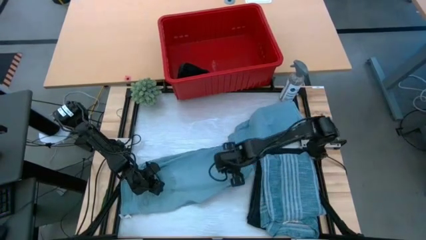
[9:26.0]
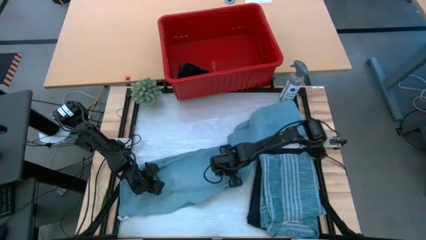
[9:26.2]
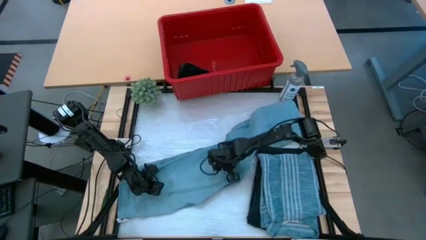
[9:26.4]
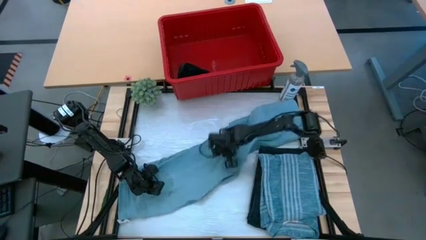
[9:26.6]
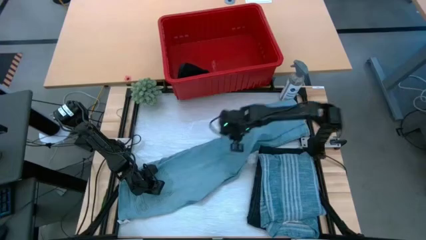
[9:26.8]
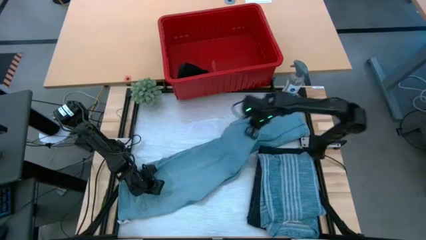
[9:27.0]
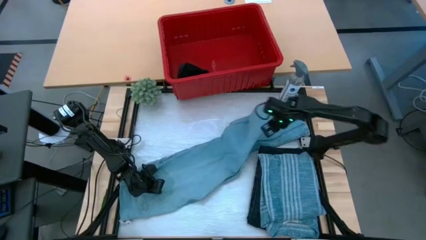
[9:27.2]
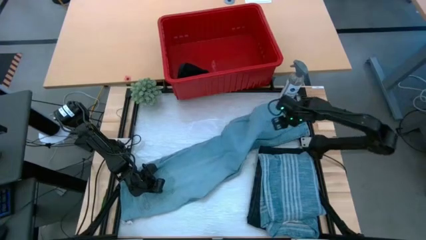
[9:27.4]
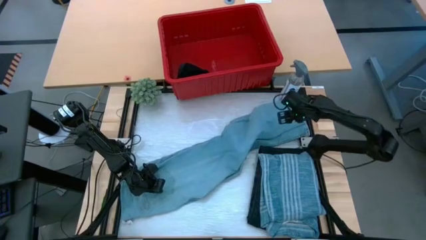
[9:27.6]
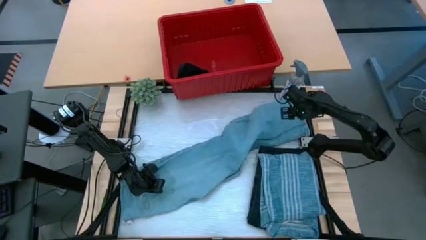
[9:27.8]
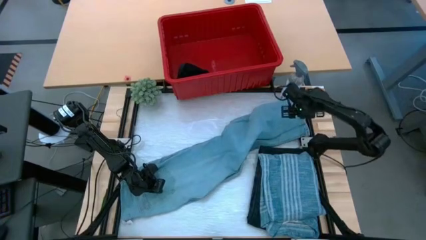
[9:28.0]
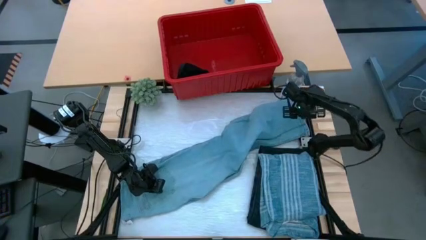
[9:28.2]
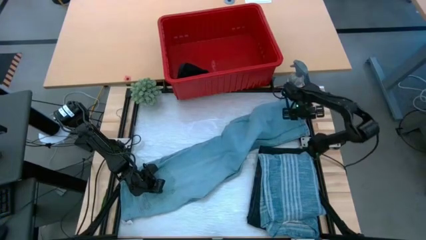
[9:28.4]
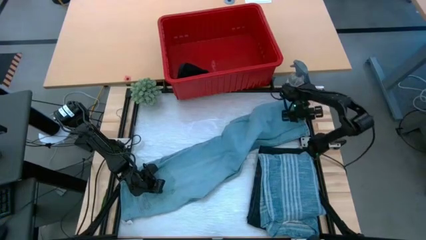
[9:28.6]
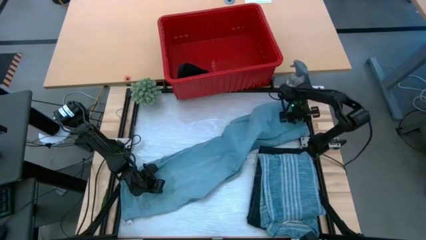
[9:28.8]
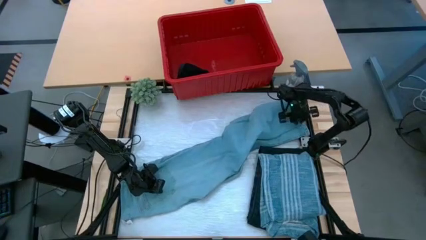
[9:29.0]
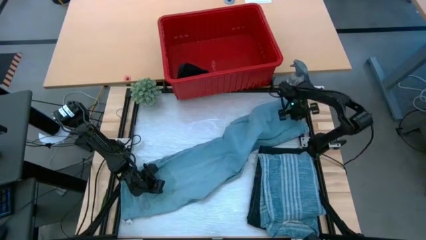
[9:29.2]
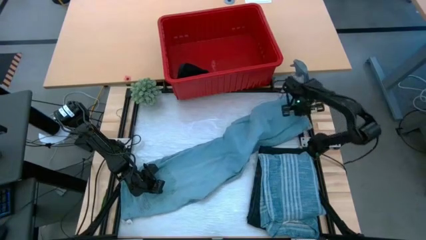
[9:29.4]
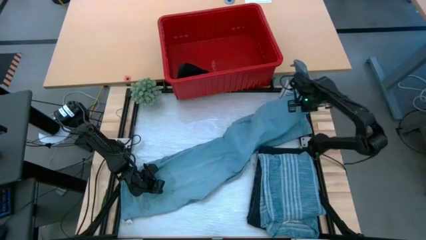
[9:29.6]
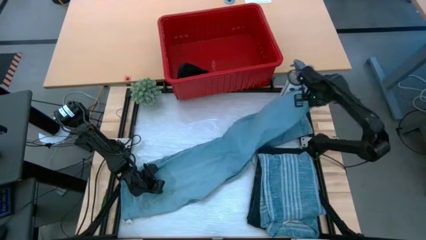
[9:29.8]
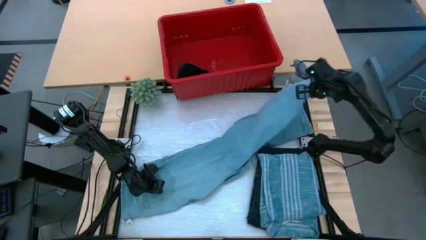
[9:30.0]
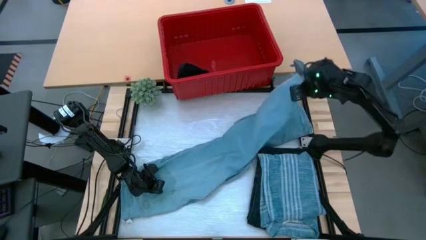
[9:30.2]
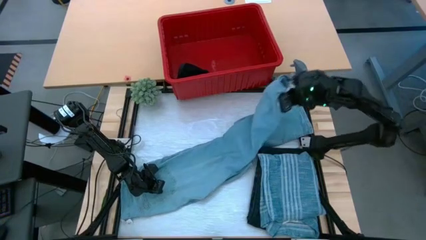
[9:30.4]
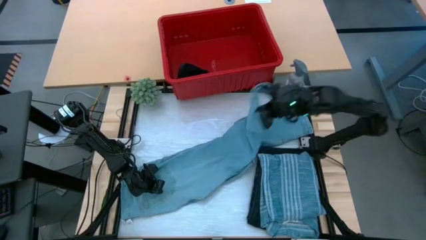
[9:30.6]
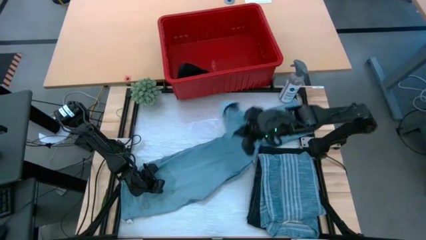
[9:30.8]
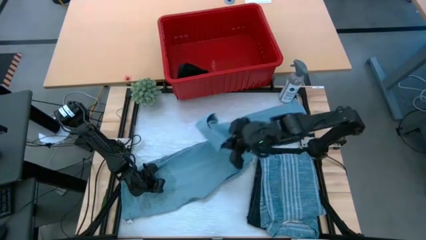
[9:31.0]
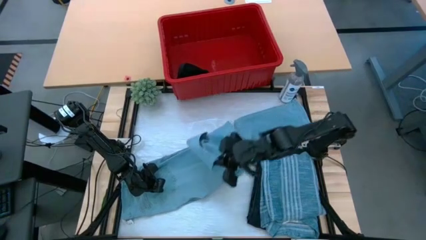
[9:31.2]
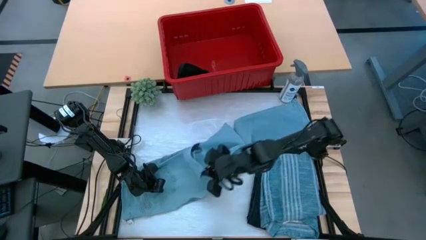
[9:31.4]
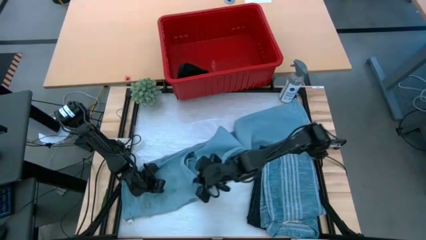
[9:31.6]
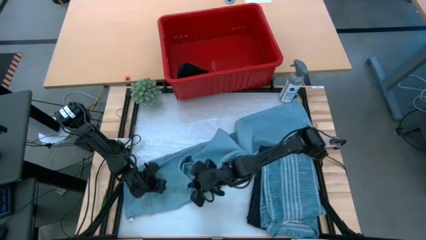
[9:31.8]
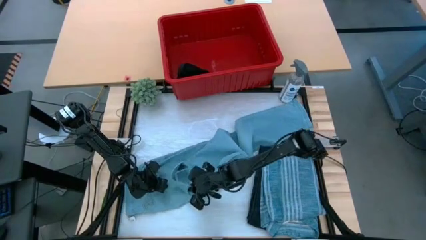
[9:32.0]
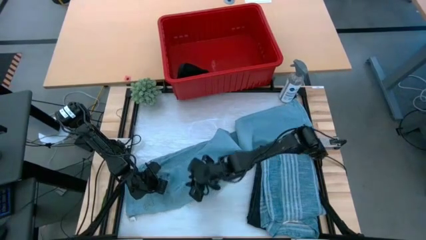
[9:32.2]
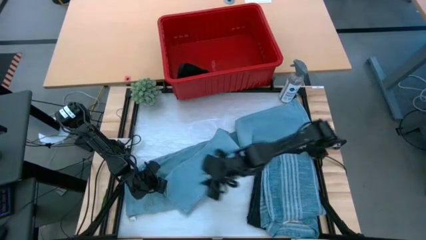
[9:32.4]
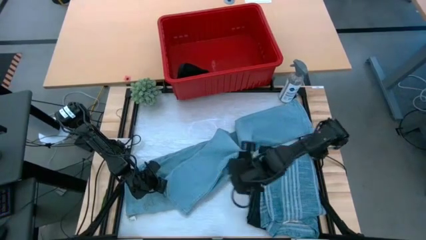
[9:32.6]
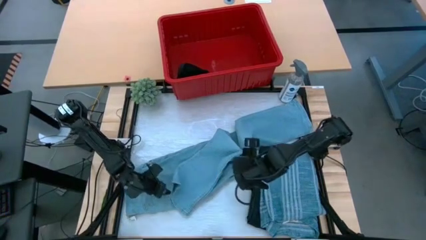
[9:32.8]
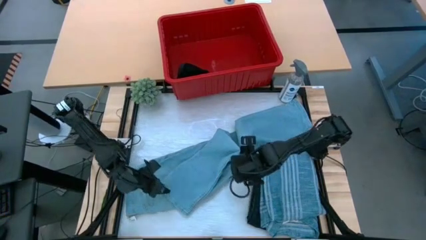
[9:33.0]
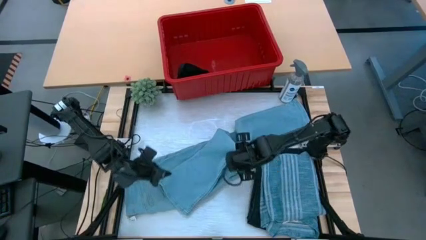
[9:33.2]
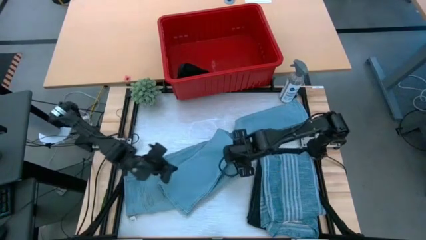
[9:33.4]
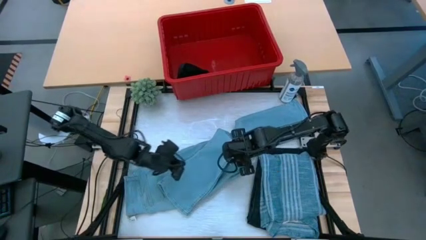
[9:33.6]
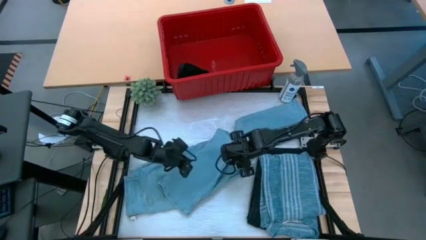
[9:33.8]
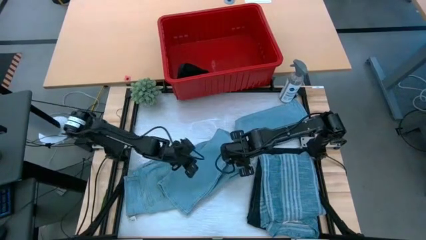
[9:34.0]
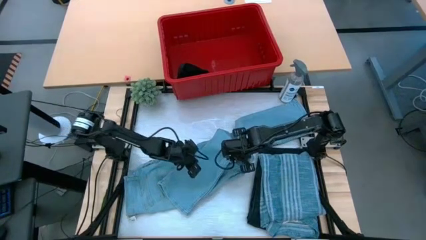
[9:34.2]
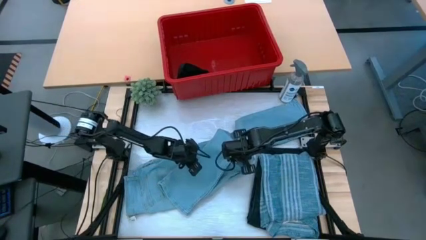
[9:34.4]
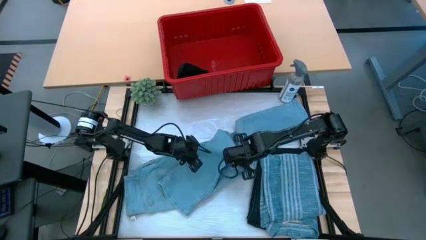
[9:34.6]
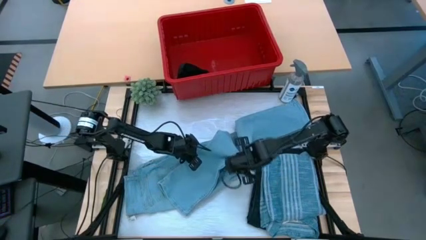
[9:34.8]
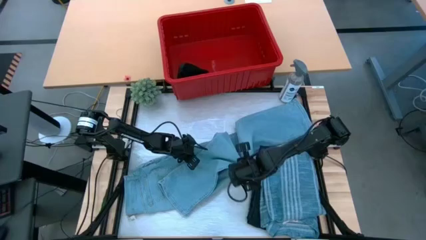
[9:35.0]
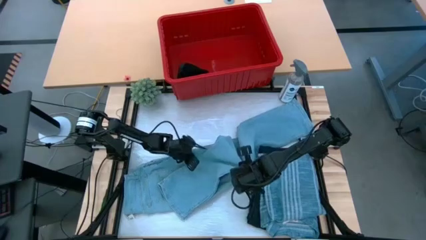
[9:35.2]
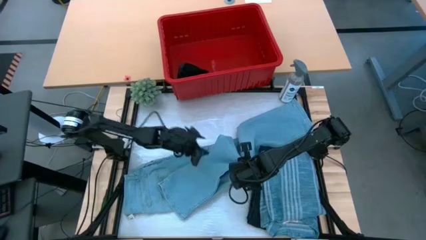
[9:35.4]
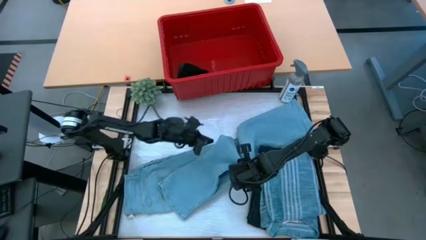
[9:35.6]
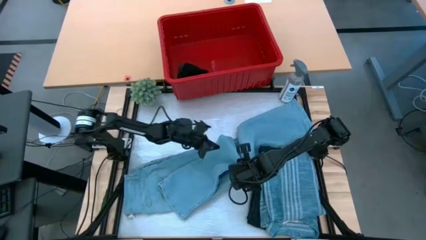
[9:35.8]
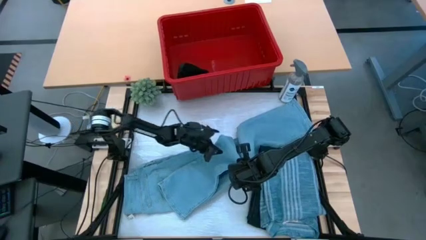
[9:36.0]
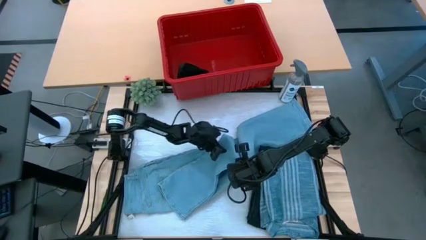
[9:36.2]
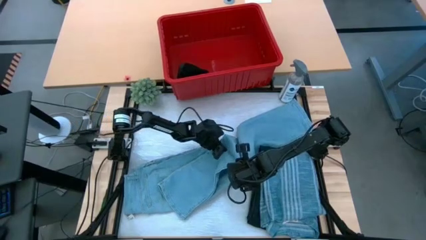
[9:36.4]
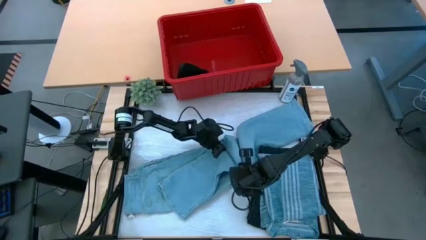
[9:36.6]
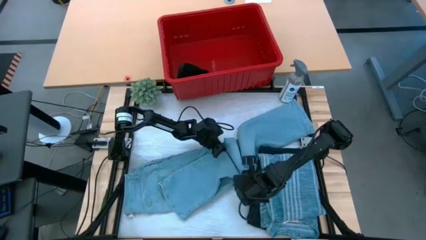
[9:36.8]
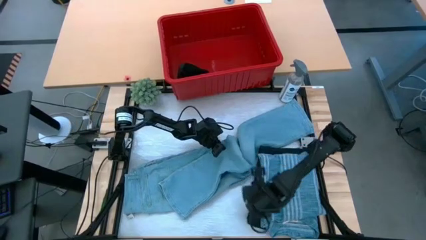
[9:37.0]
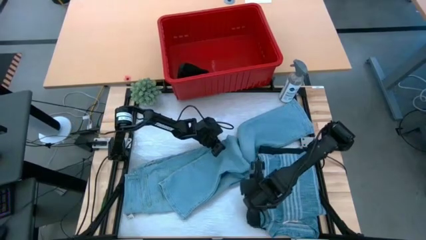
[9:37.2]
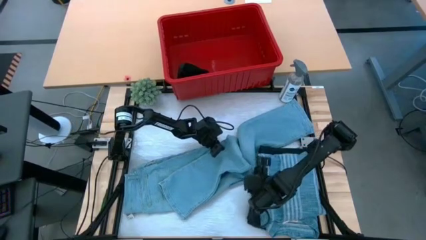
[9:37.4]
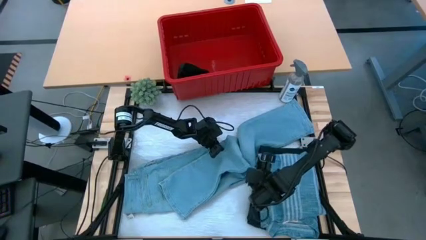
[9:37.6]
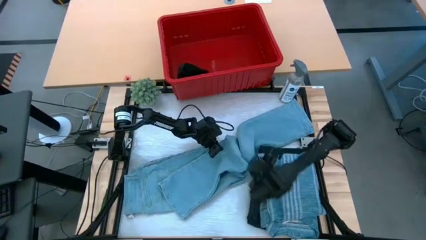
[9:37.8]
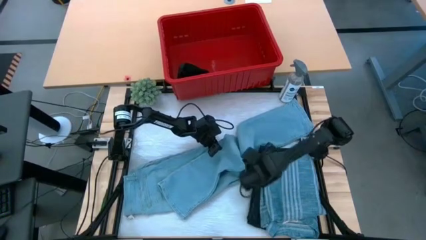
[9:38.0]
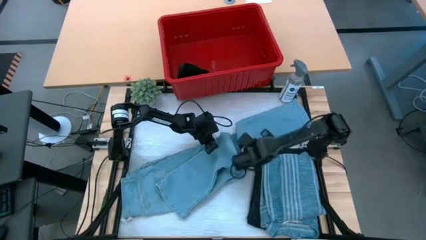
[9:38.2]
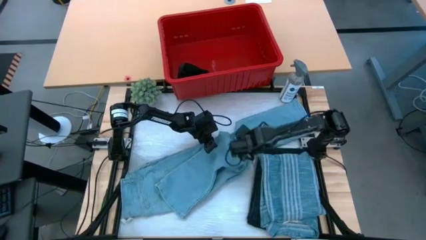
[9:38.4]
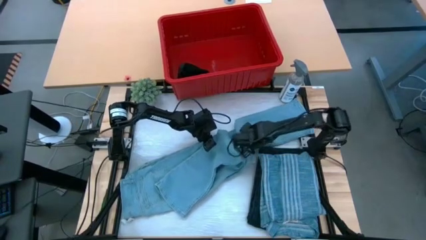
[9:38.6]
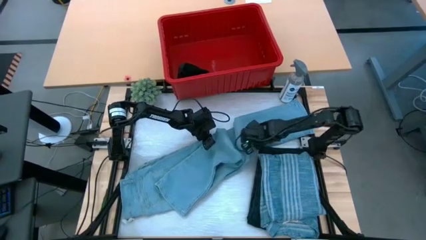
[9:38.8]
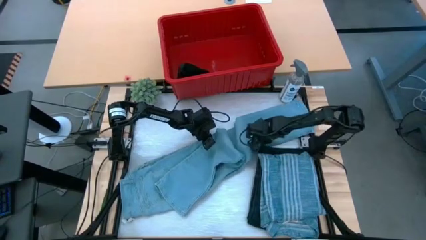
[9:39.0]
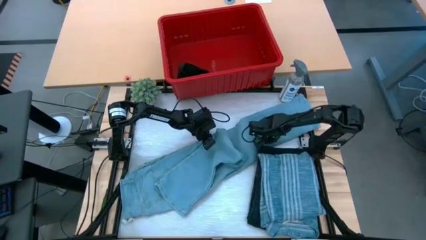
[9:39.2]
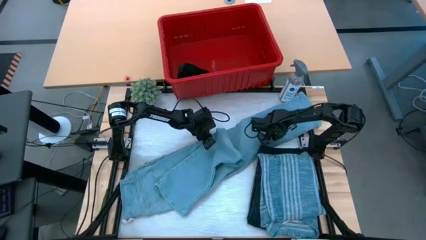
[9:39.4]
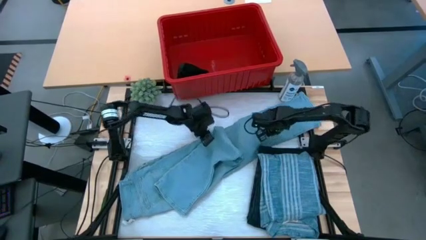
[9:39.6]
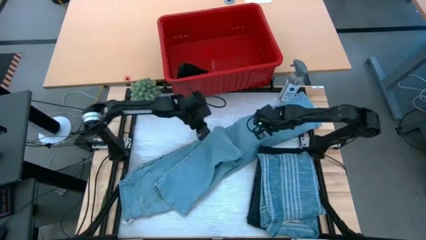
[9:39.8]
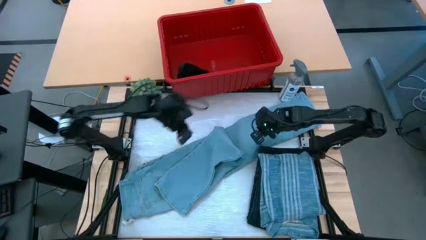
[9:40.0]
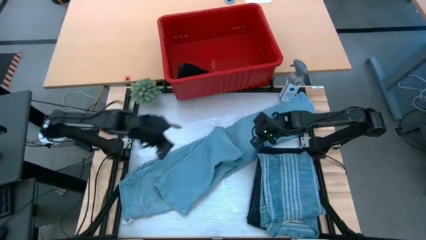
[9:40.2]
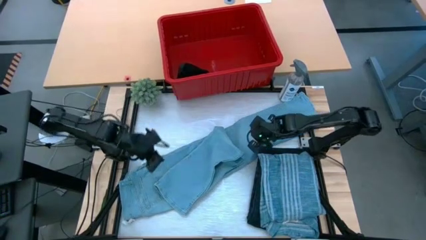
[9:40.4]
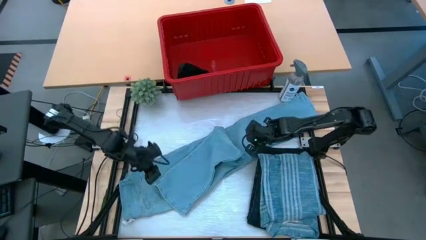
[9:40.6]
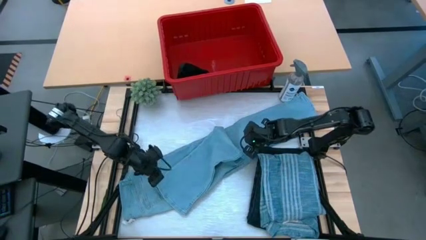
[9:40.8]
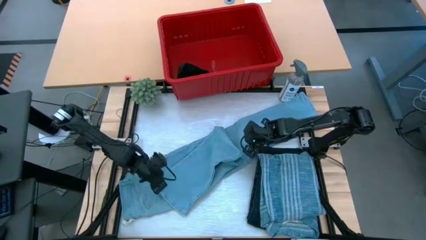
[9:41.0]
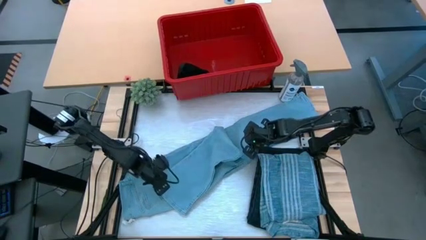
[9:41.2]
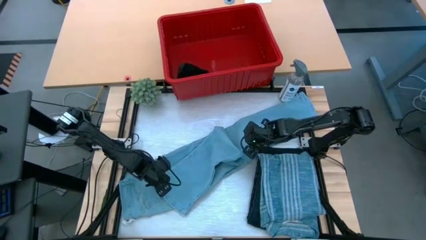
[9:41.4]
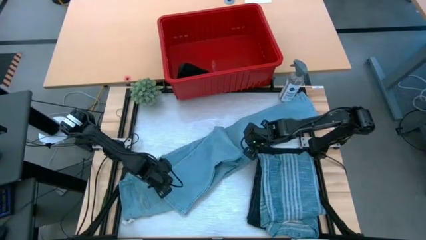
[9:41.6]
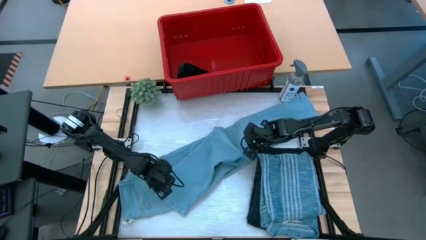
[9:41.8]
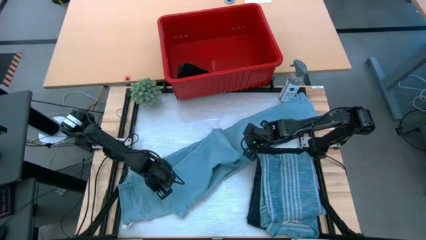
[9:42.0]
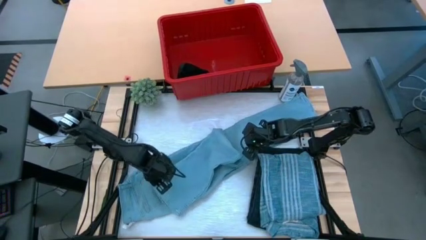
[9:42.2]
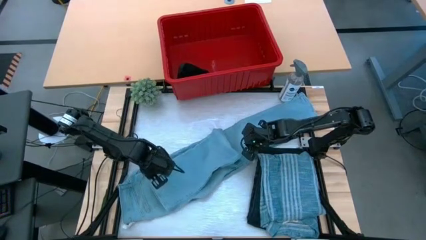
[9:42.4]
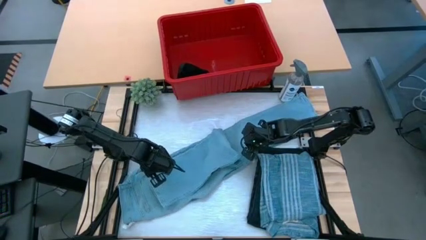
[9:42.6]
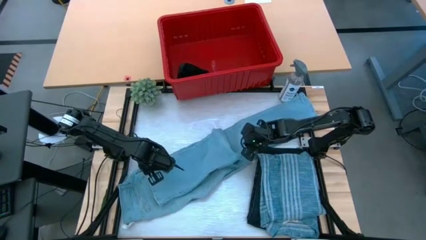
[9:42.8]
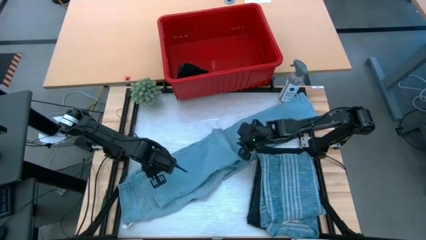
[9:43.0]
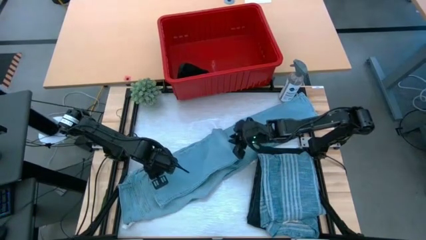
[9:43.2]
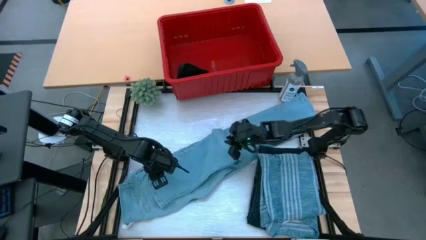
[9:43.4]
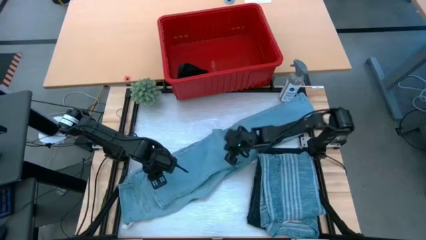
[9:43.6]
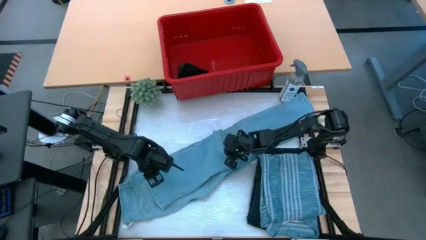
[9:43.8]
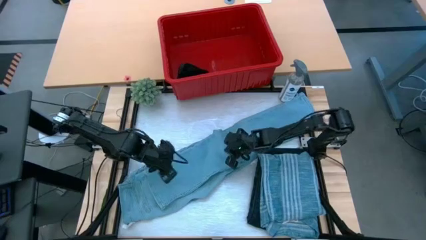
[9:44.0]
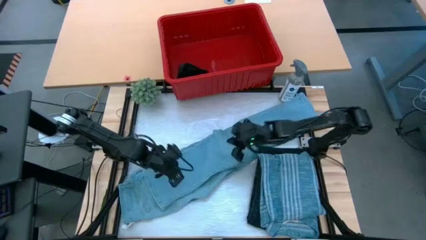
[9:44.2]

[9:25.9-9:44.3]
Task: Fold Laundry from Bin
Fold the light blue denim pants
